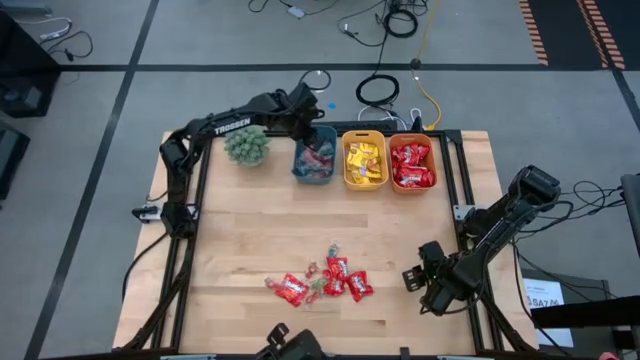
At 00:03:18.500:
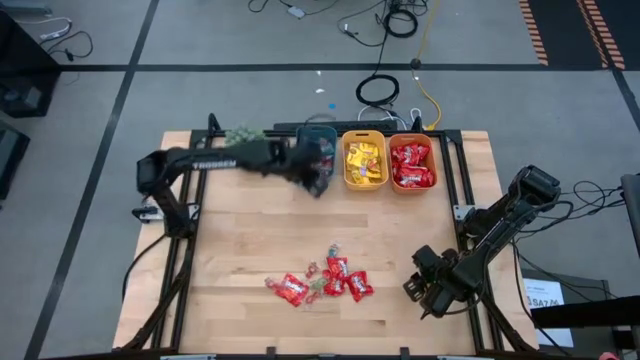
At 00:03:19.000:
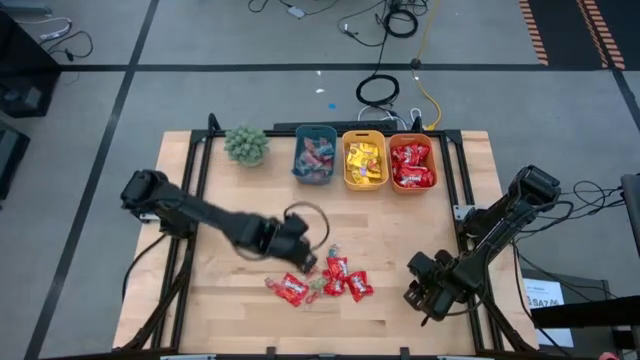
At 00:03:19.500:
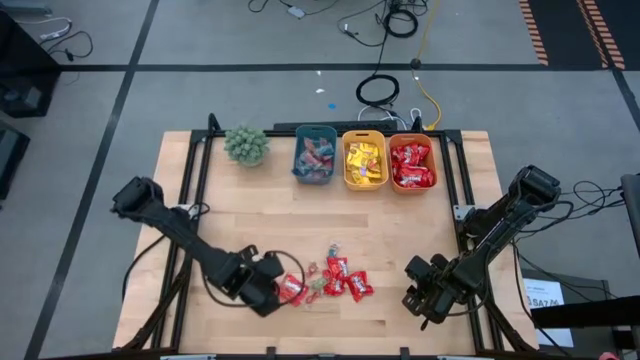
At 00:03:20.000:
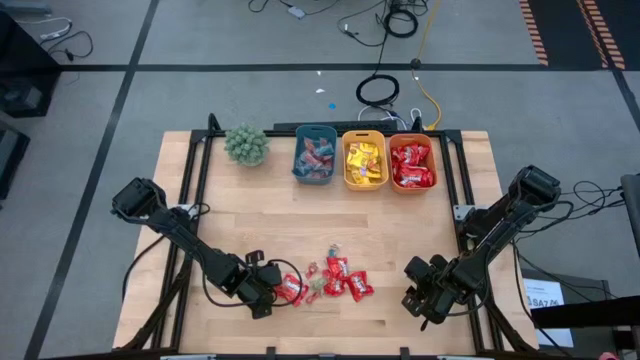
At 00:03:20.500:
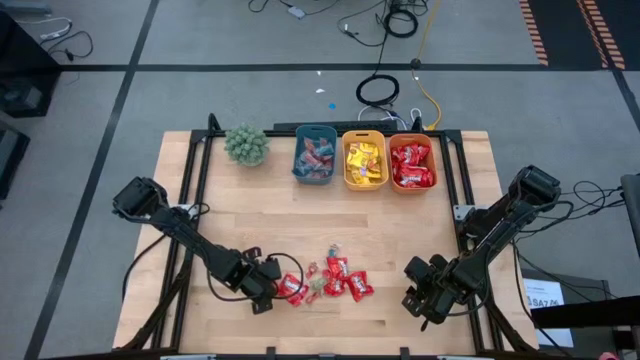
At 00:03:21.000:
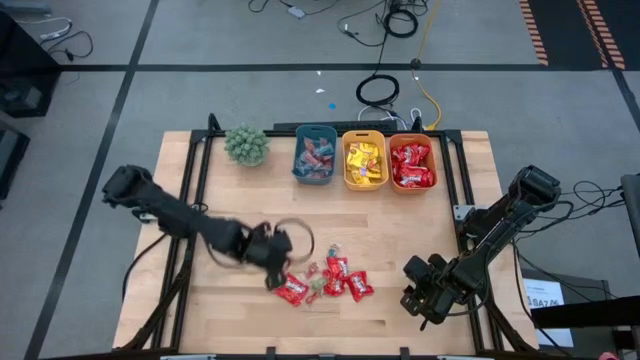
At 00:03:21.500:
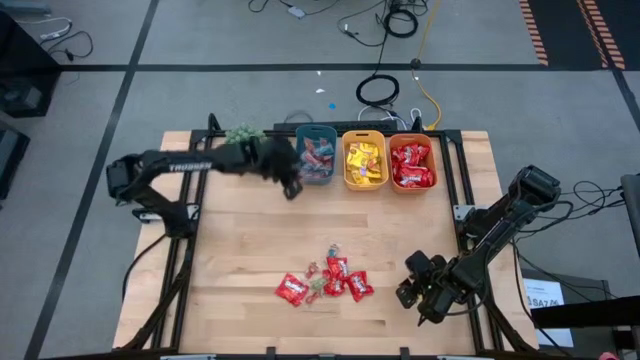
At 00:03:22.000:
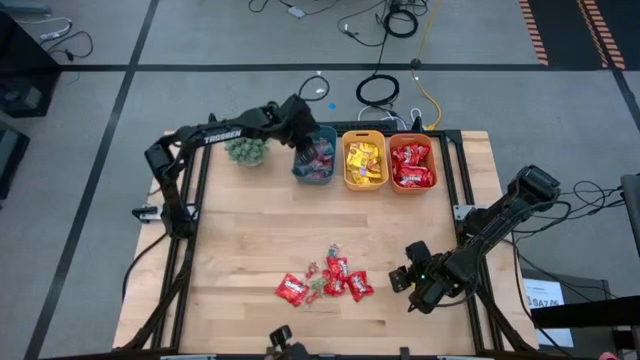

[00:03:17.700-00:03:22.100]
Task: Sort candy
Put the orange gummy into the blue bin

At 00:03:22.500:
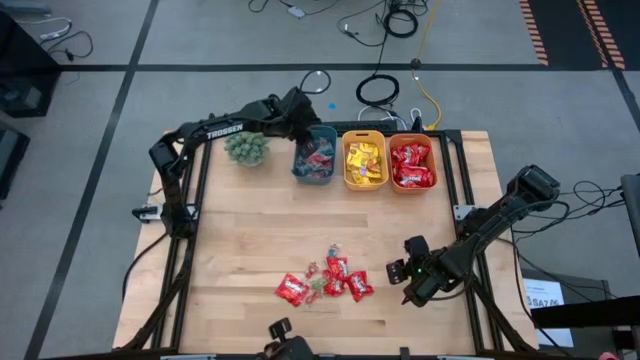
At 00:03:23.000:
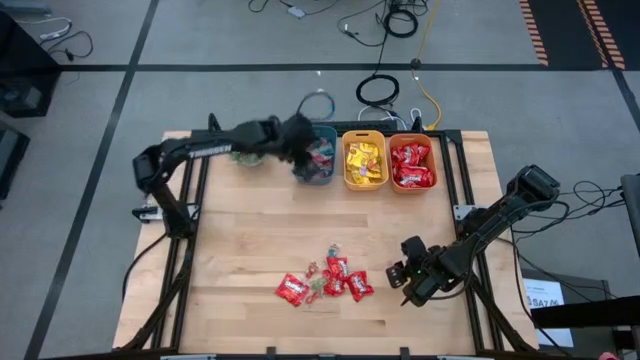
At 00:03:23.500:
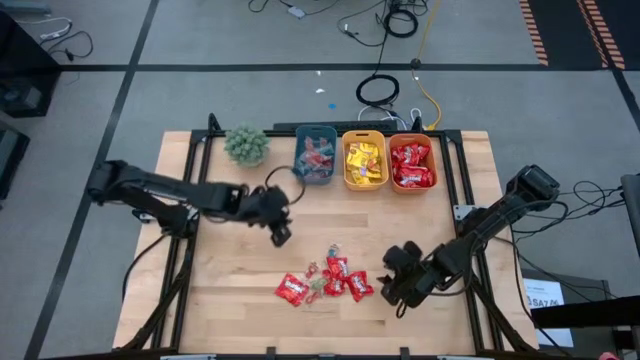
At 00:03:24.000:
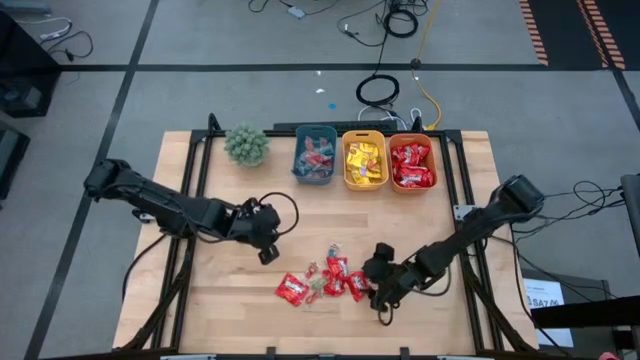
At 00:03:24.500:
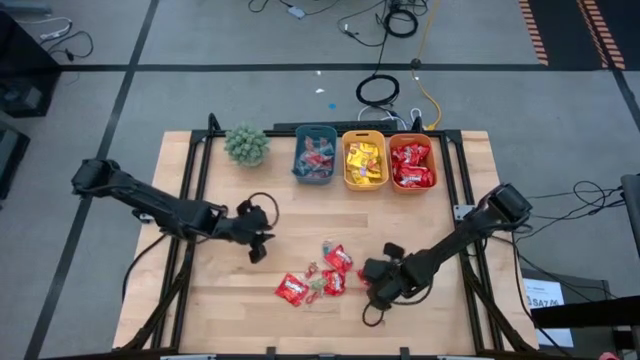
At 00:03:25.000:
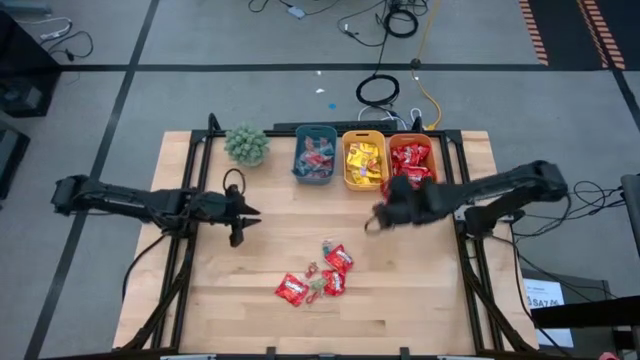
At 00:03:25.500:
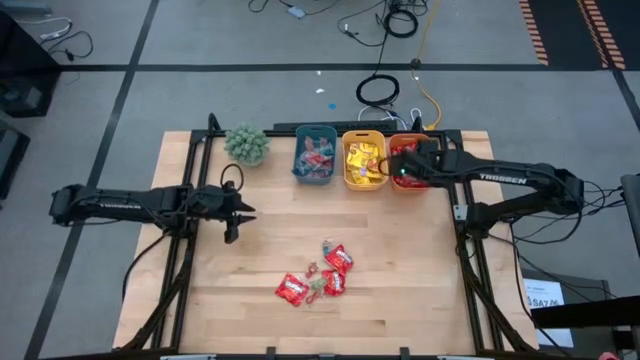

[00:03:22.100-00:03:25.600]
Put the red candy into the orange bin

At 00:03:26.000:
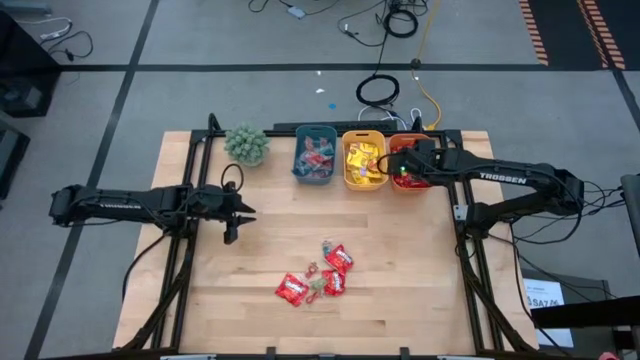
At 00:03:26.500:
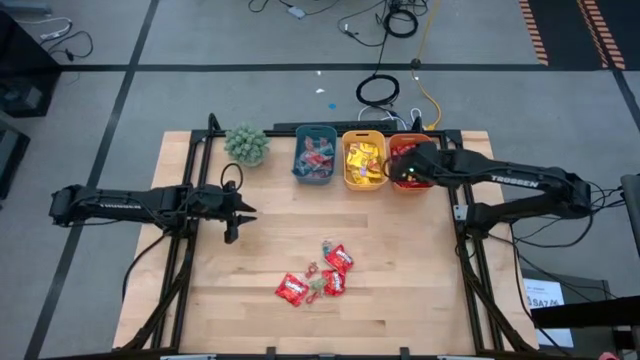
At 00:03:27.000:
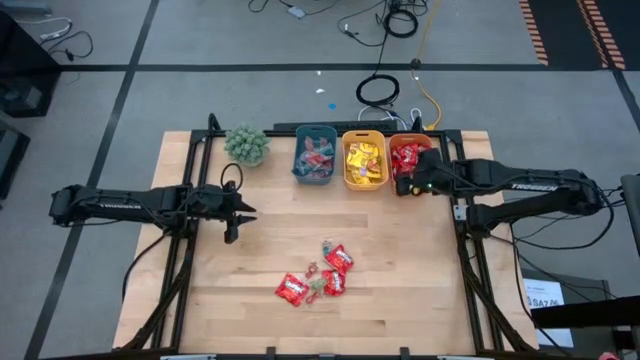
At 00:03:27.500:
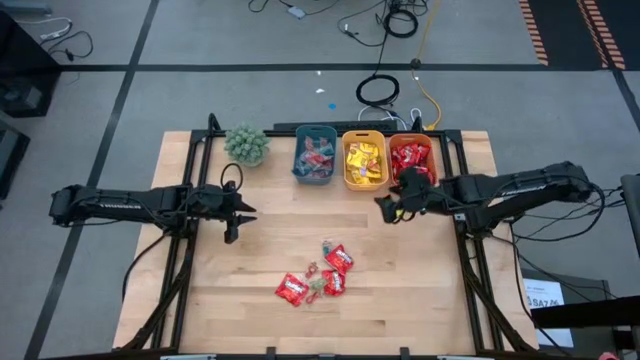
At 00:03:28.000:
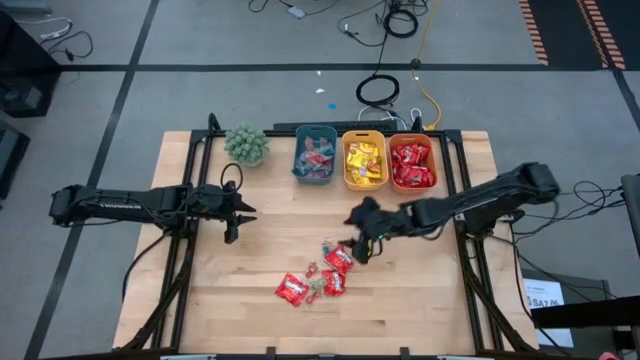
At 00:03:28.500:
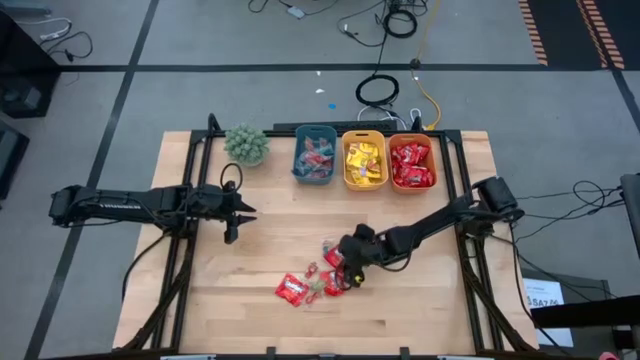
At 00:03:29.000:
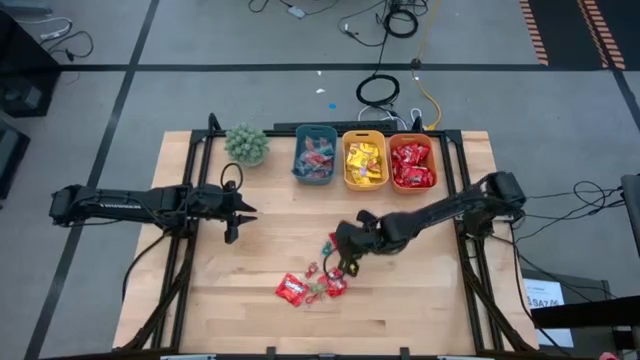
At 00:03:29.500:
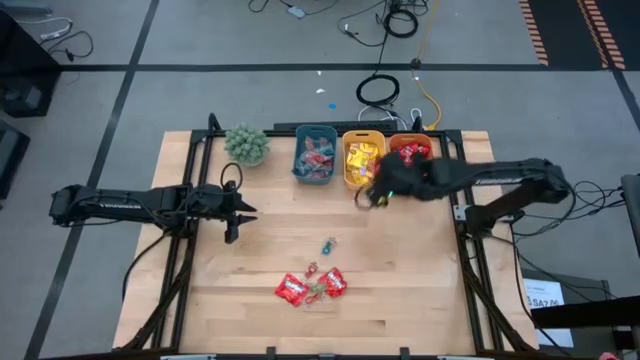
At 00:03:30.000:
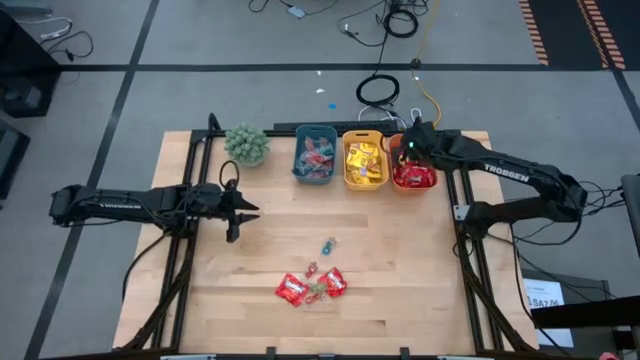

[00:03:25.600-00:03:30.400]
Put the red candy into the orange bin

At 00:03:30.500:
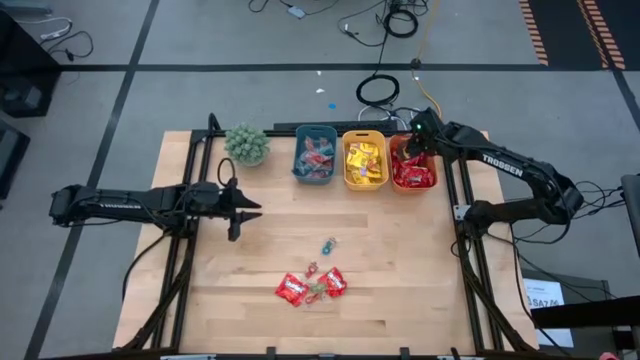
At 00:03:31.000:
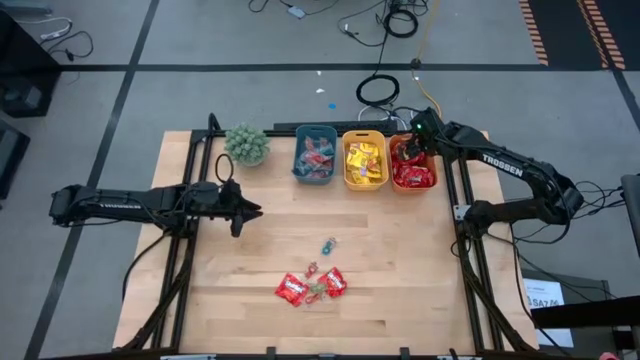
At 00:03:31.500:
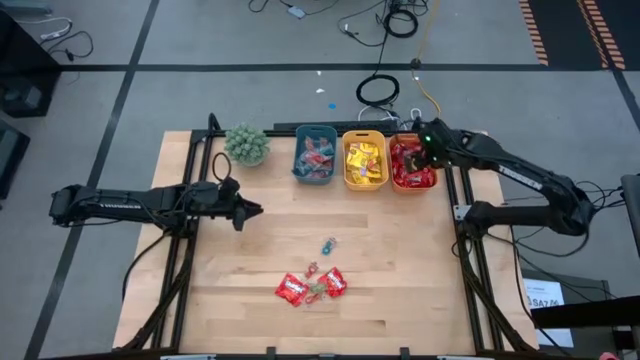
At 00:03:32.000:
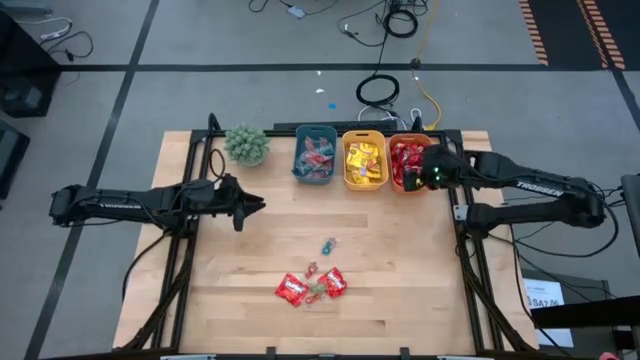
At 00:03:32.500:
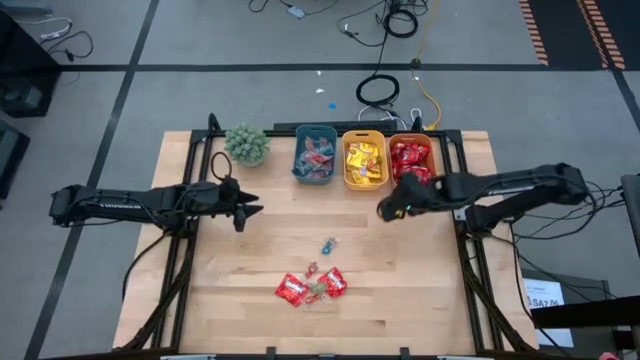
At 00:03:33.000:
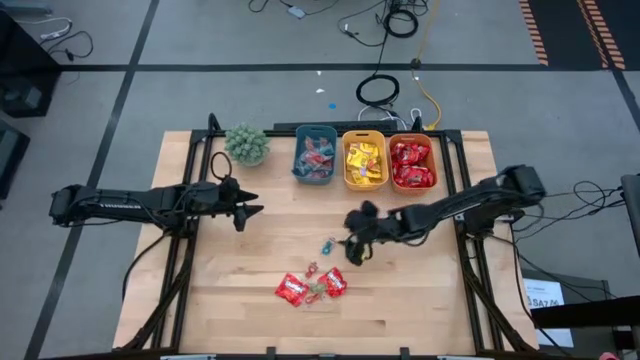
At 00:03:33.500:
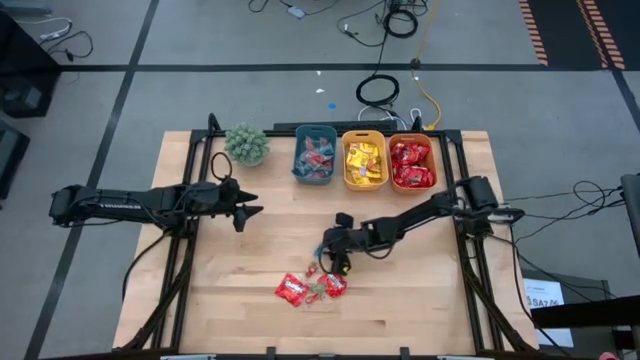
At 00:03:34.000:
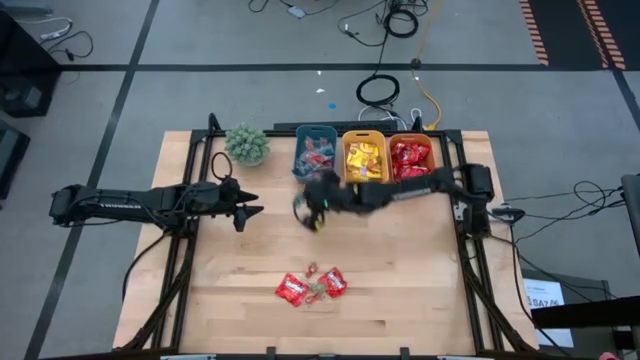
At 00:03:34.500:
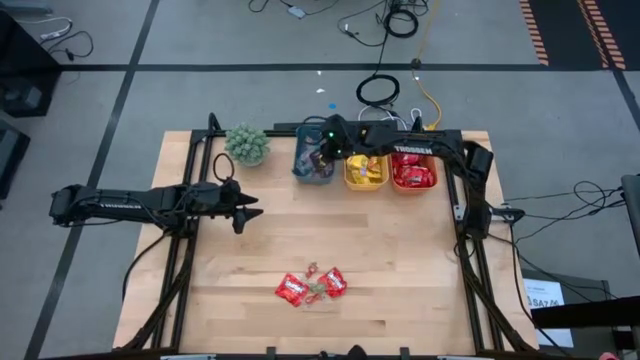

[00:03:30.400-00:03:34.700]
Put the blue gummy into the blue bin

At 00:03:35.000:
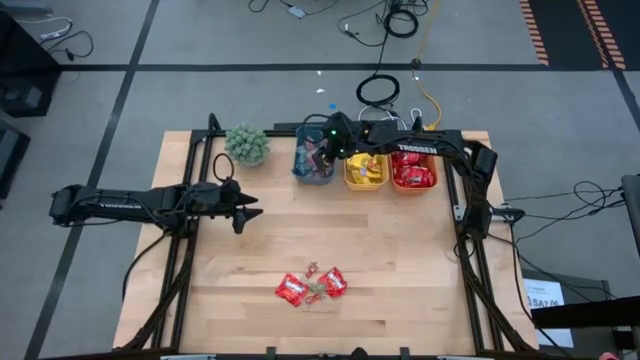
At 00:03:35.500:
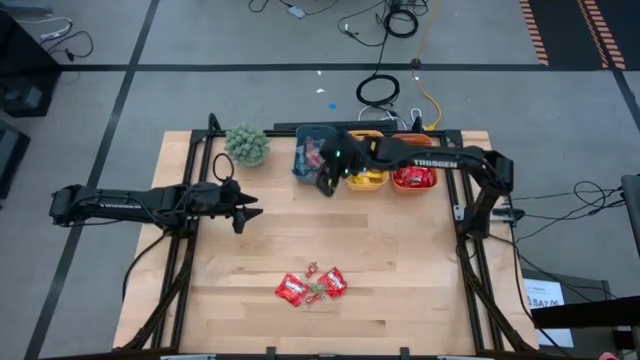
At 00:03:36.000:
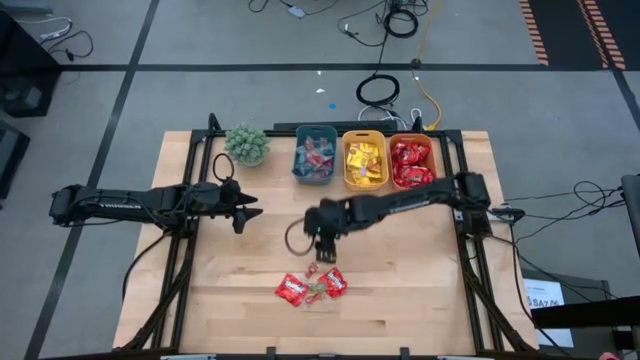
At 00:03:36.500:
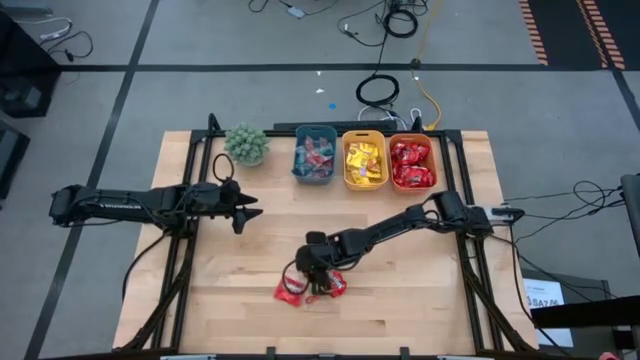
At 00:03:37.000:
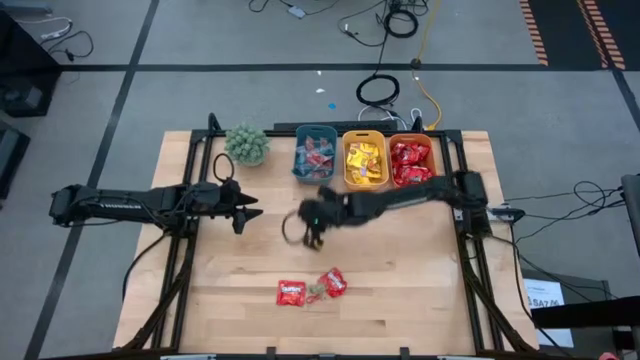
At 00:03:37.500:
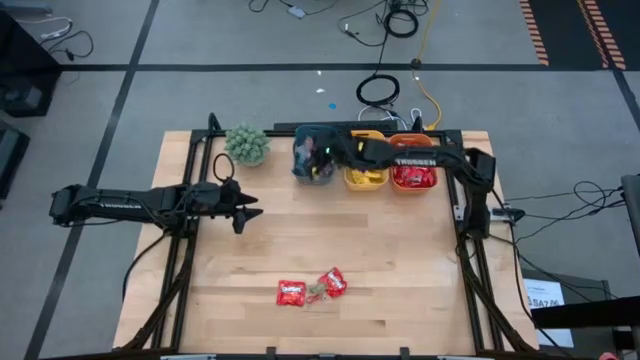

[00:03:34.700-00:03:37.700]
Put the orange gummy into the blue bin

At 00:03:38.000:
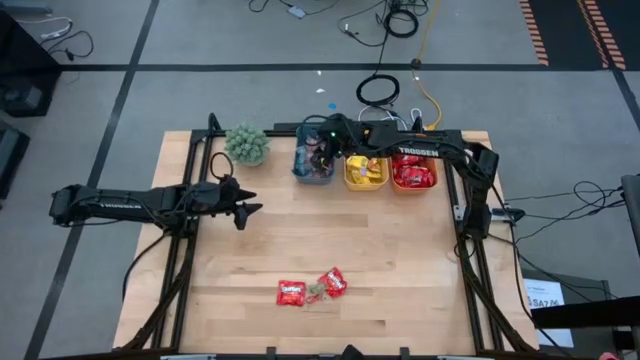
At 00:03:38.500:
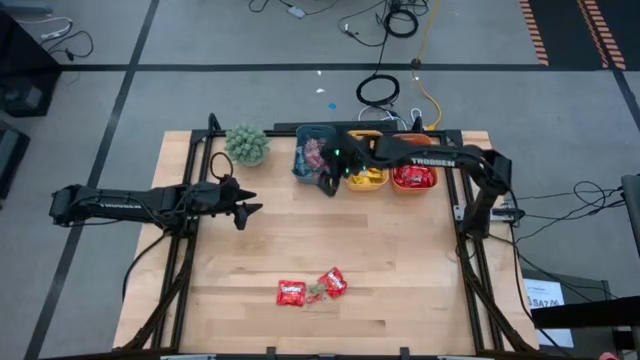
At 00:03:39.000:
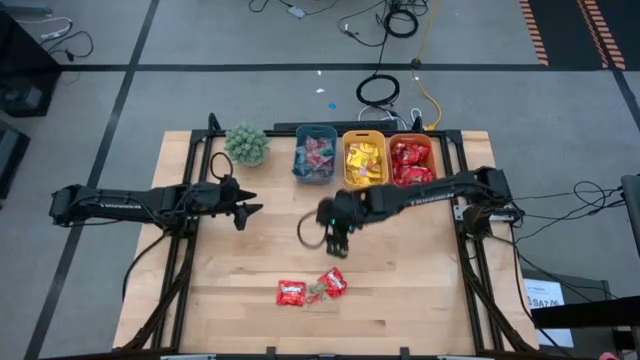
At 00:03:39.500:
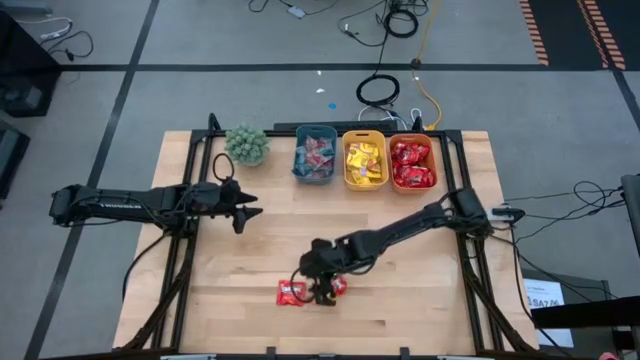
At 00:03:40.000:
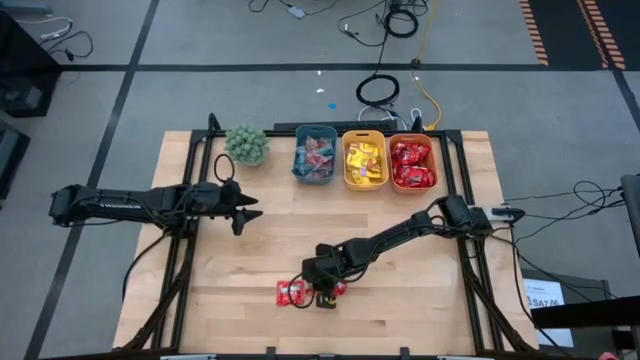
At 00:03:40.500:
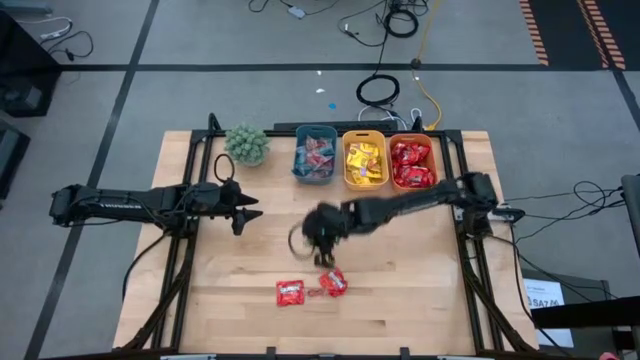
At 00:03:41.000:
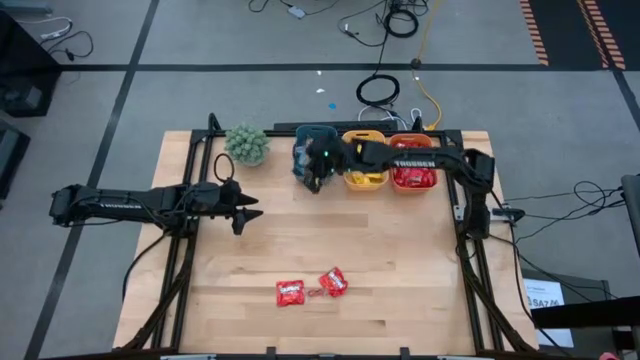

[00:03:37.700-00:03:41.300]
Put the green gummy into the blue bin
